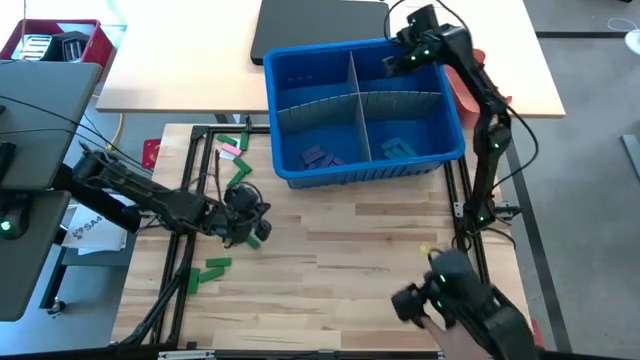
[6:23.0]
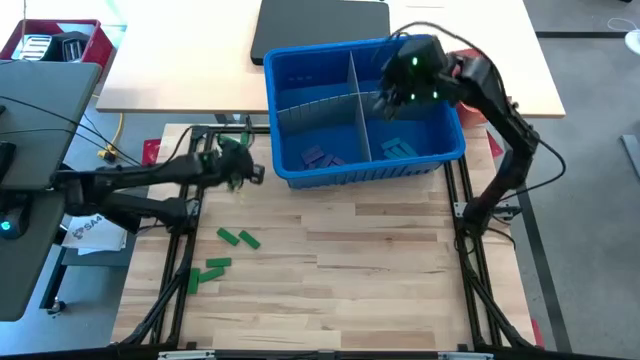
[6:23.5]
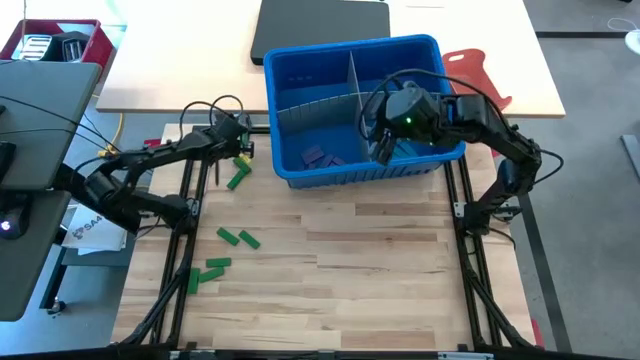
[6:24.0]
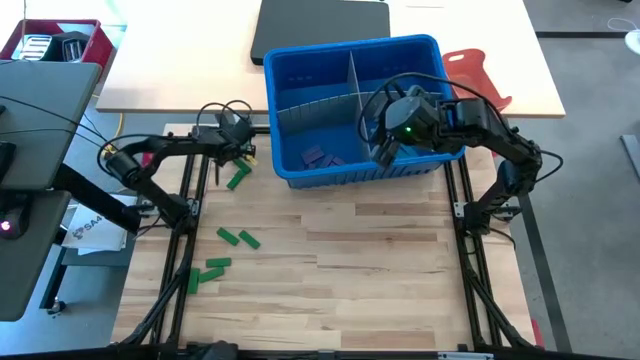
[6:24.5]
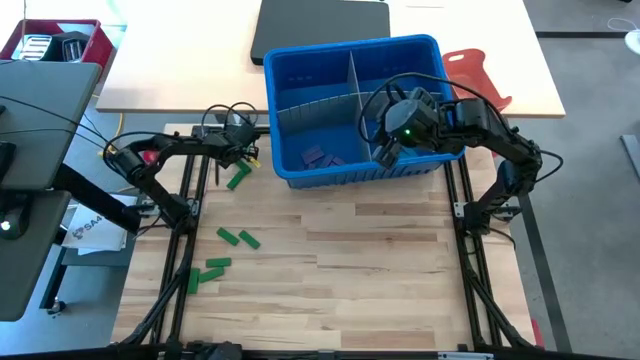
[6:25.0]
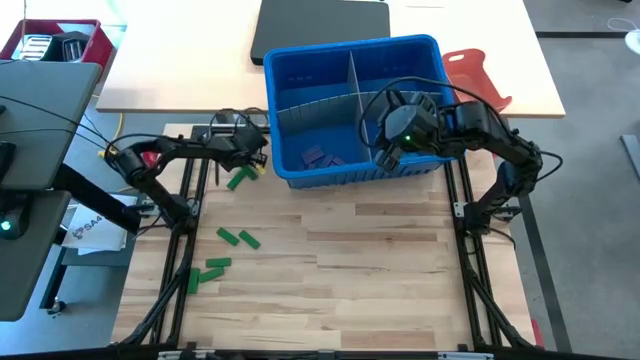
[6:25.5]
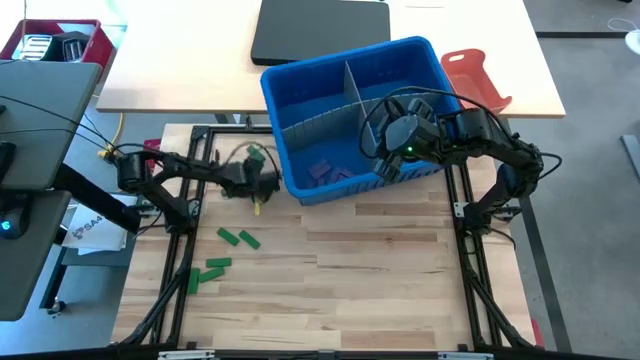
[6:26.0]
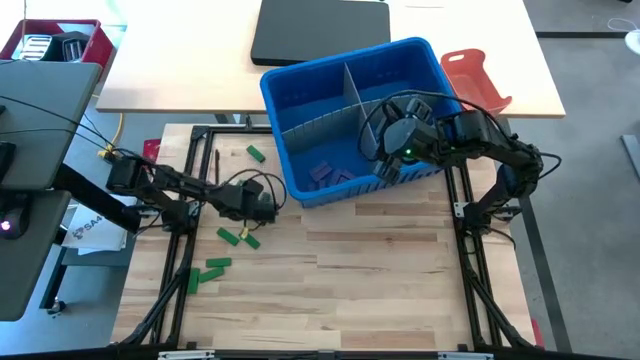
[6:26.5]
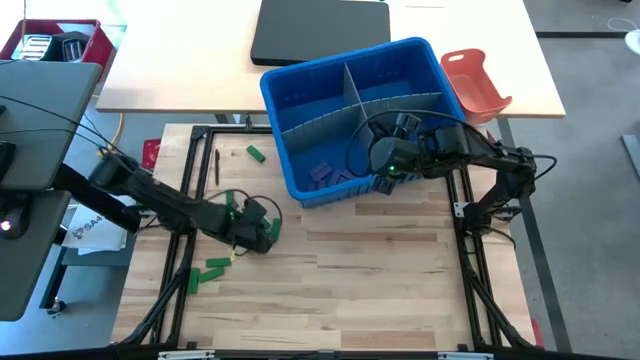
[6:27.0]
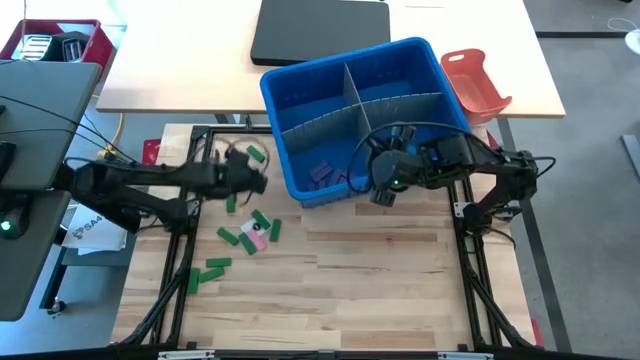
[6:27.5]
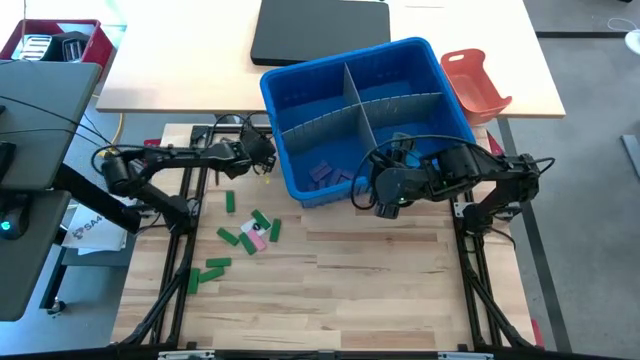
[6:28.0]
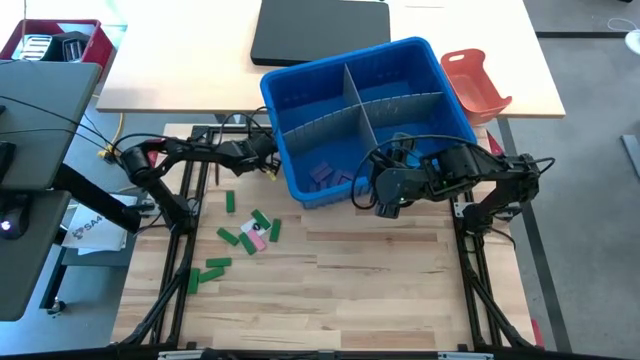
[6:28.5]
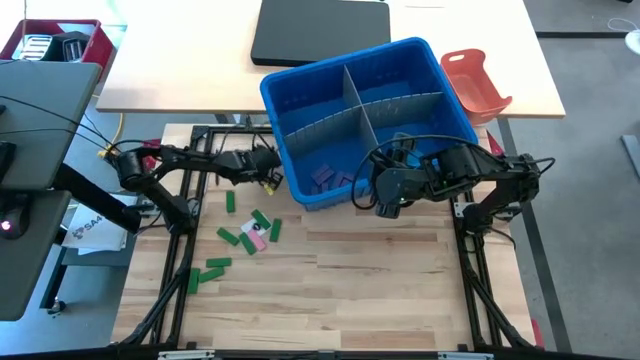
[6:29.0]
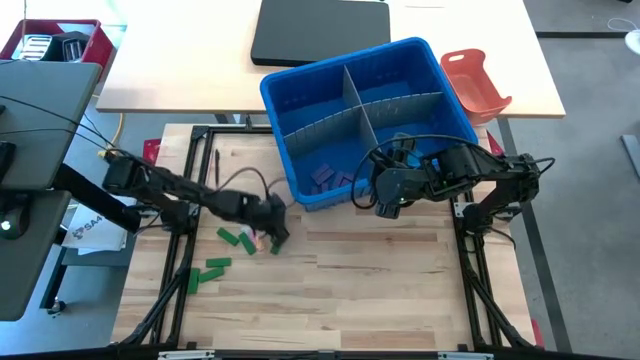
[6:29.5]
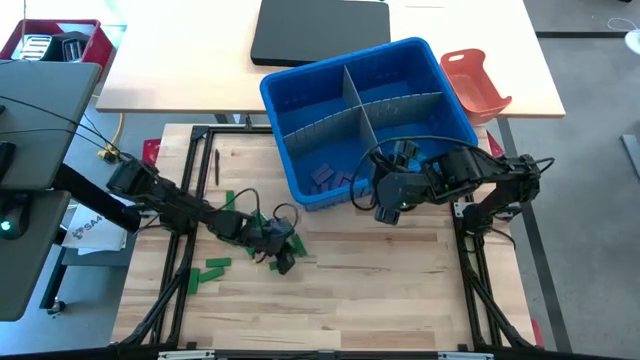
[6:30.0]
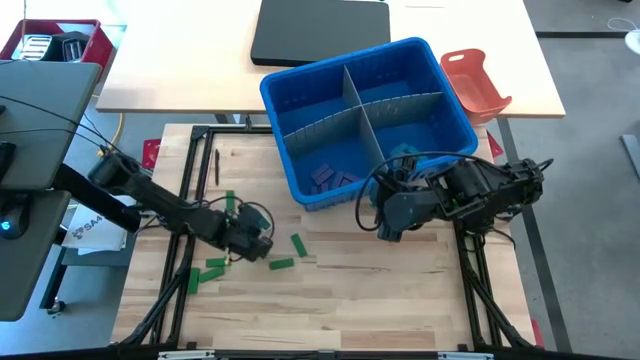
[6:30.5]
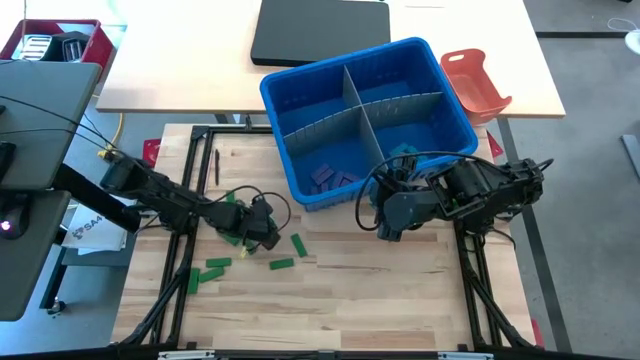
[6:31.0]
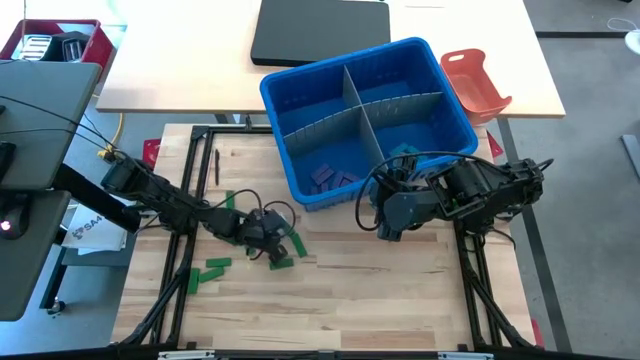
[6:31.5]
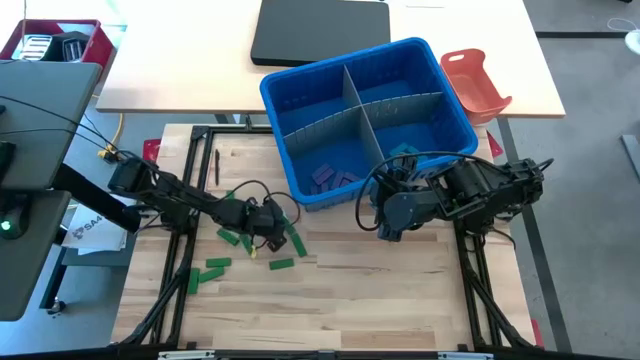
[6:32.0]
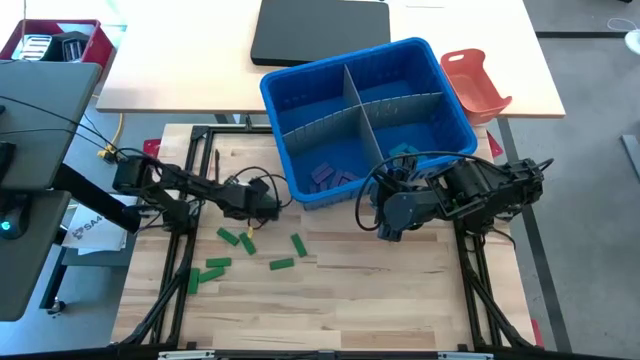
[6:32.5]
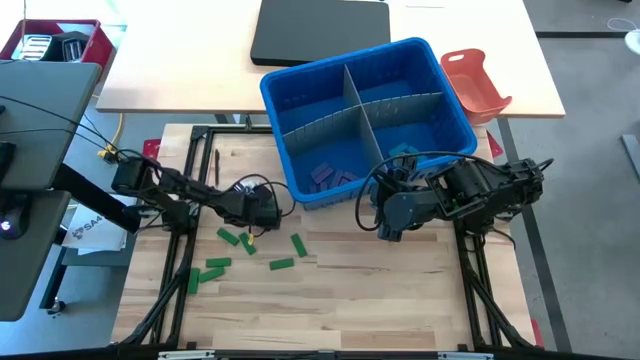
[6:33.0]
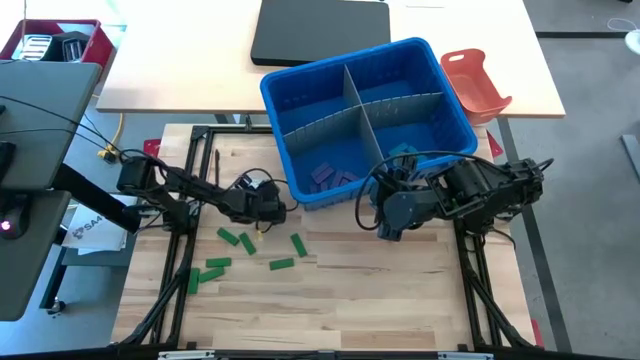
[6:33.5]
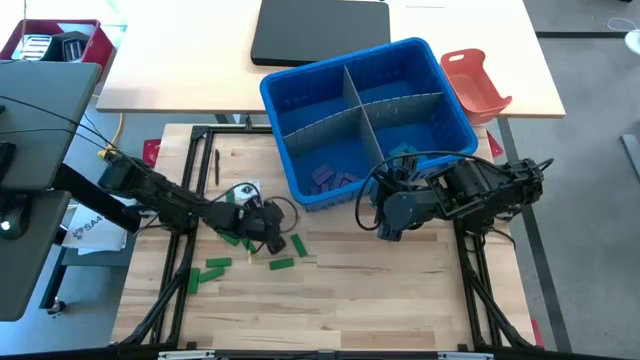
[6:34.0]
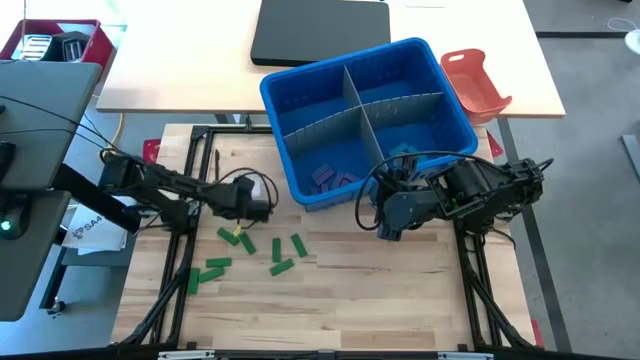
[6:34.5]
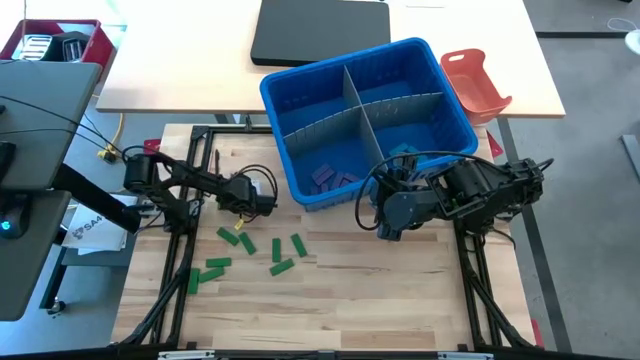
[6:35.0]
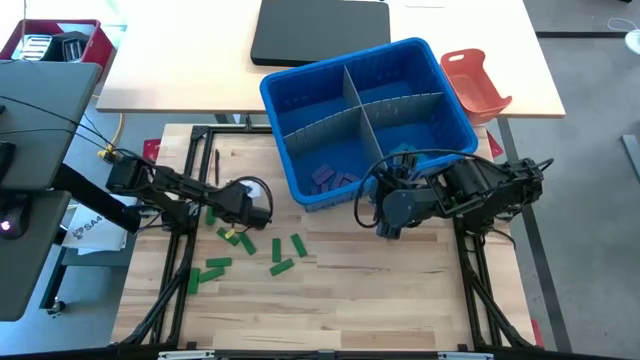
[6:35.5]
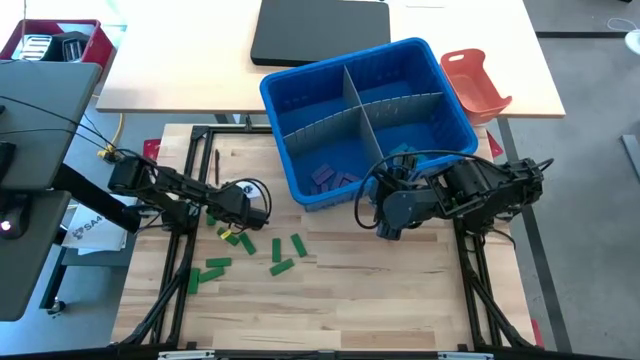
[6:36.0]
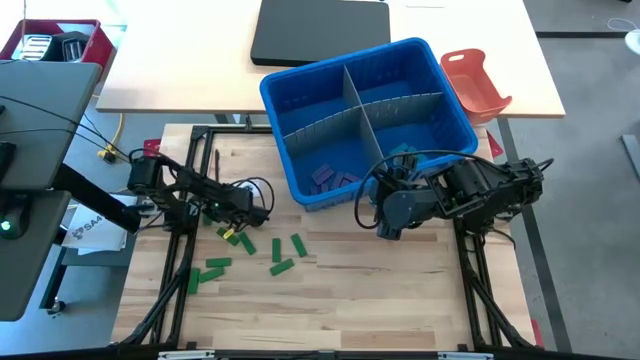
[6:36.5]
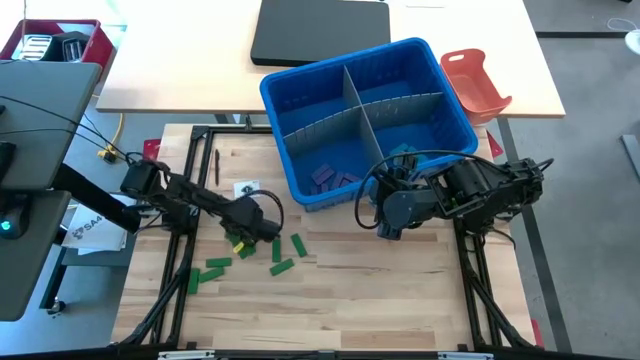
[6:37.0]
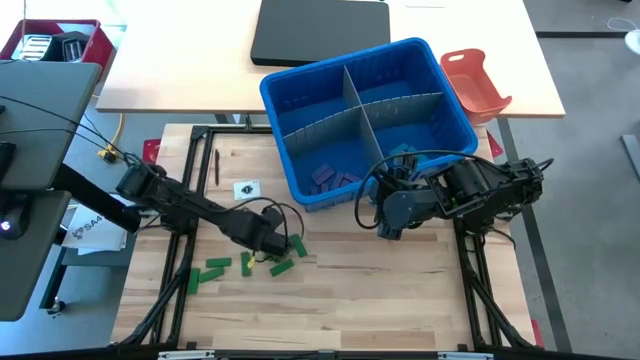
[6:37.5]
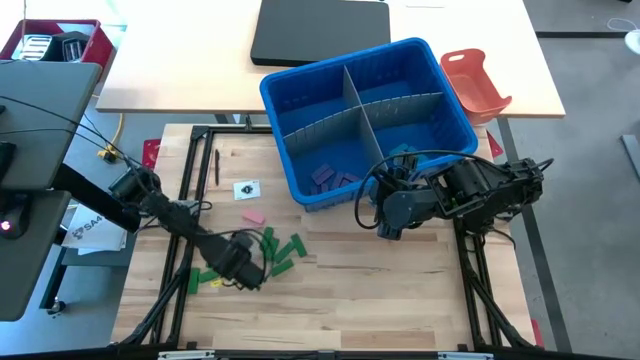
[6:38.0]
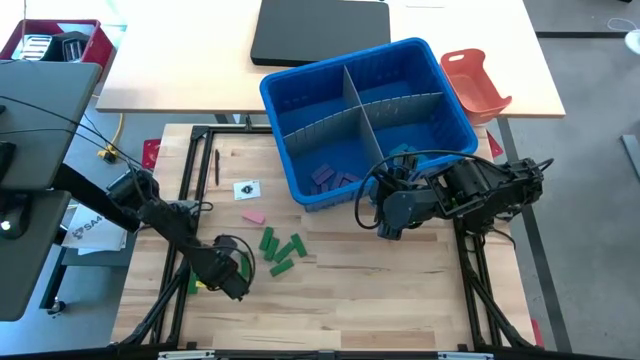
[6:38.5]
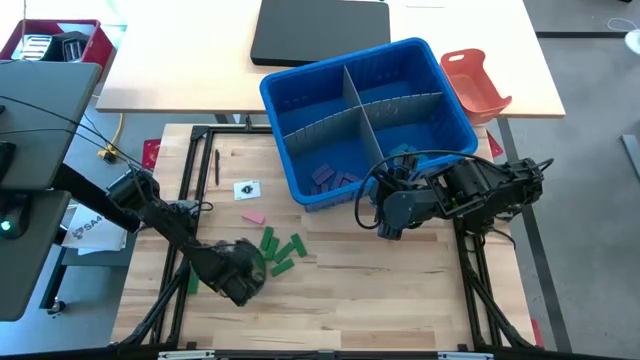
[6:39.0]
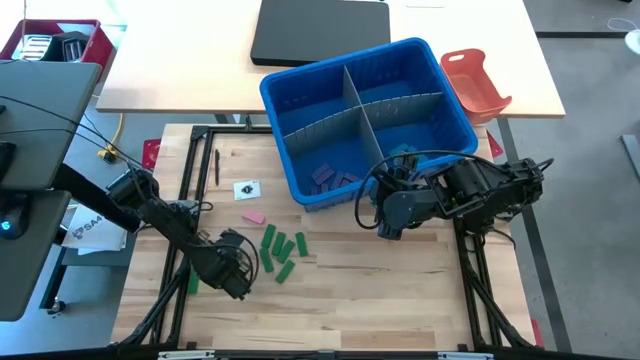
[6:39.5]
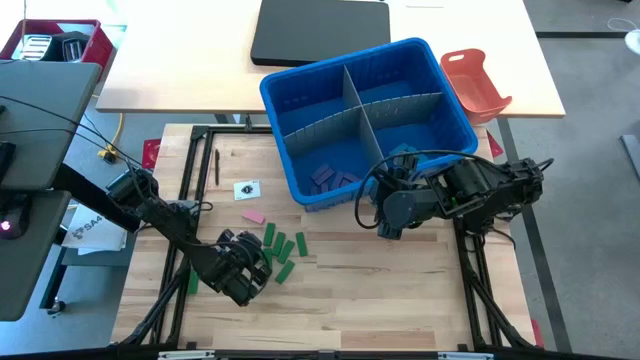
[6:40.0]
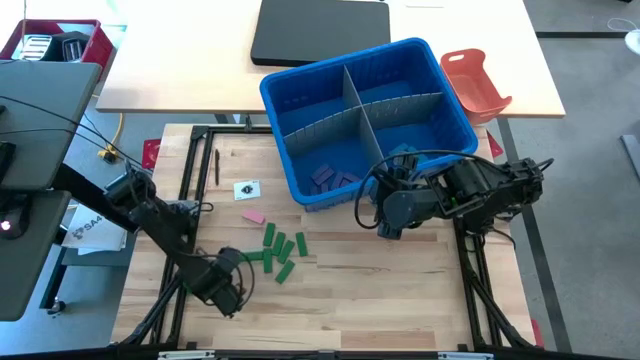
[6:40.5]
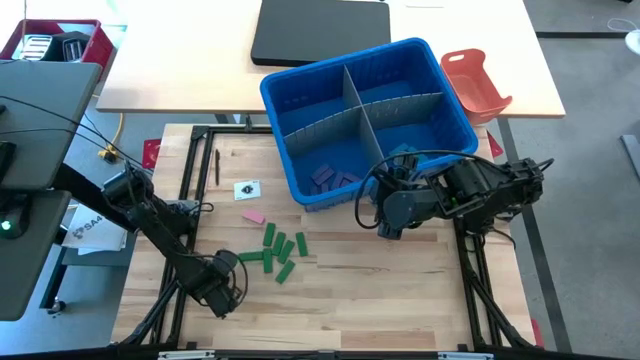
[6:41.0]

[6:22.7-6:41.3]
Task: Sort blocks
Move the blocks to the center of the table

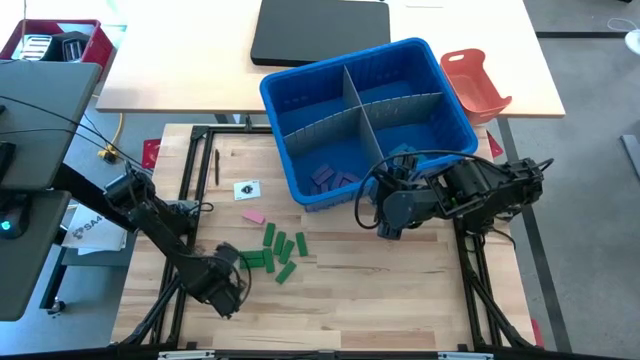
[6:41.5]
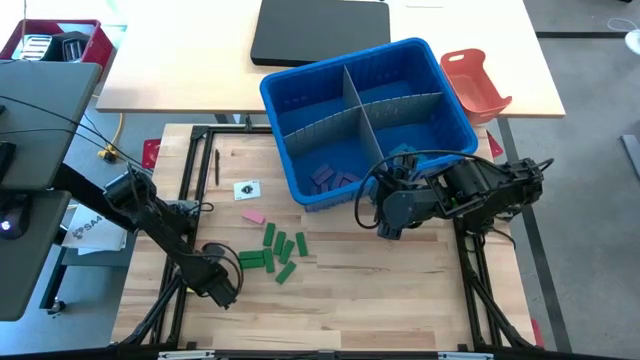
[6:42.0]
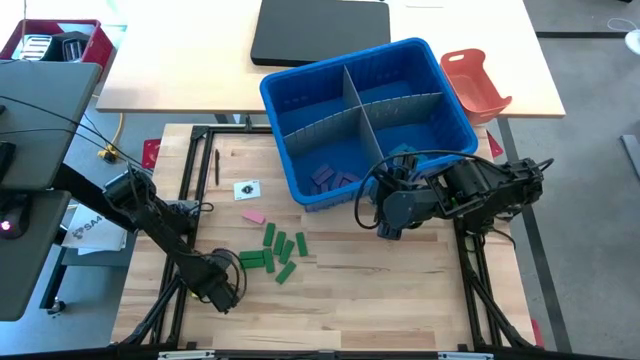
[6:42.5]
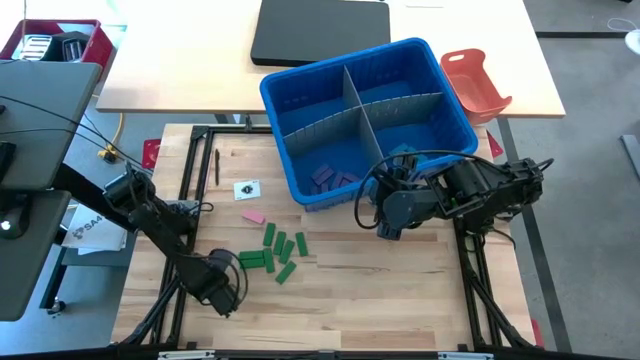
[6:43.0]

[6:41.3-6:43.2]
Move the blocks to the center of the table

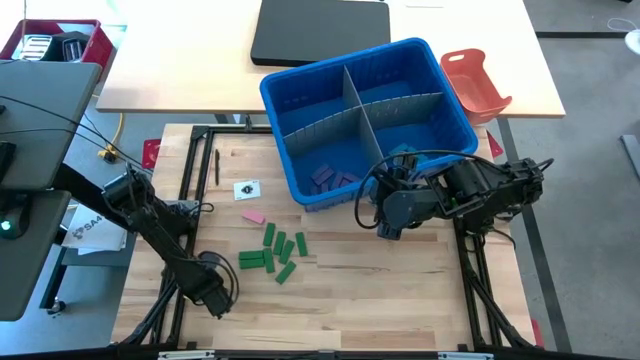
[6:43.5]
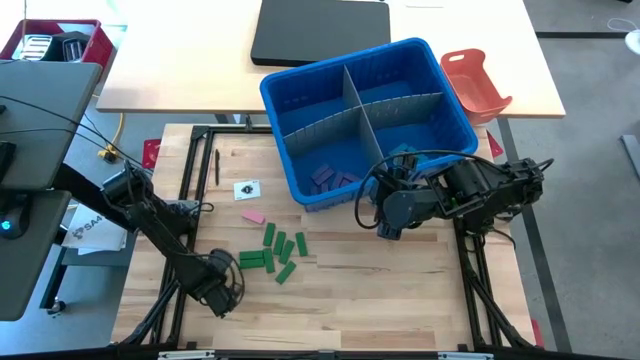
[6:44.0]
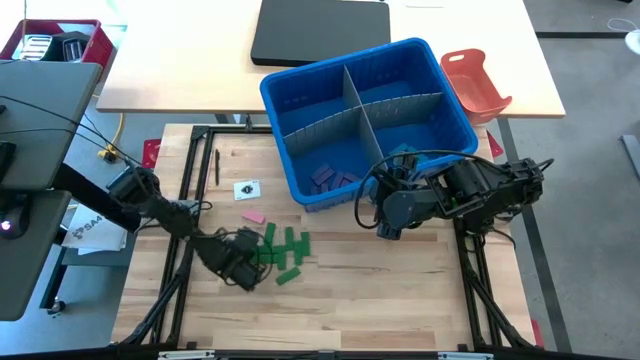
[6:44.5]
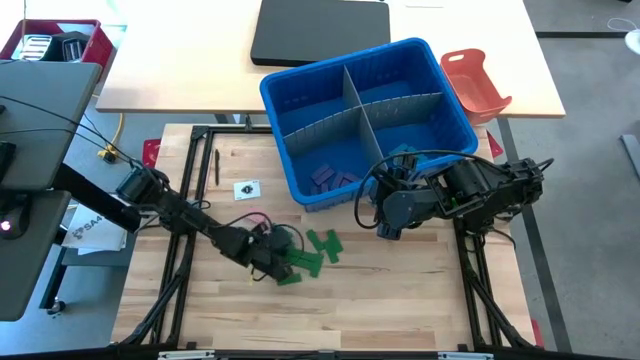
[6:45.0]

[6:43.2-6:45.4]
Move the blocks to the center of the table
